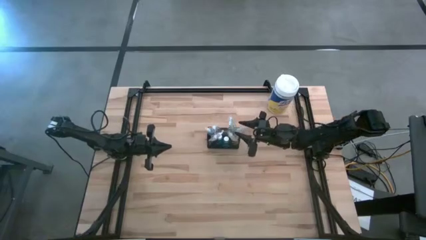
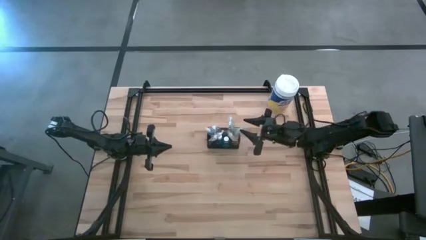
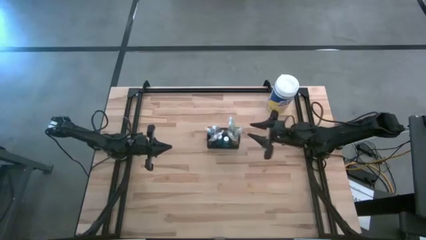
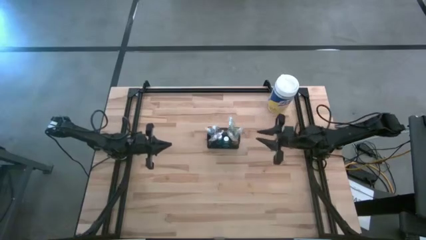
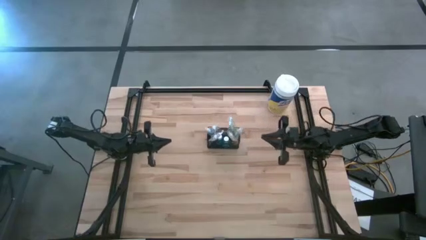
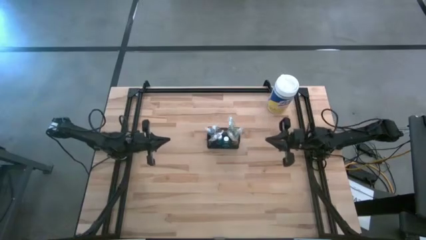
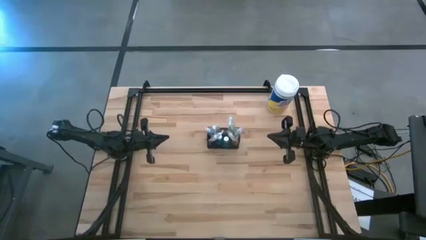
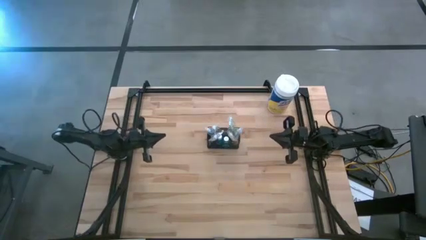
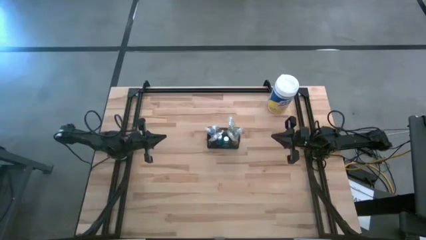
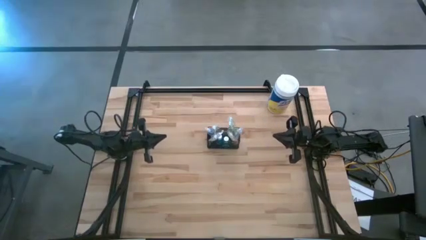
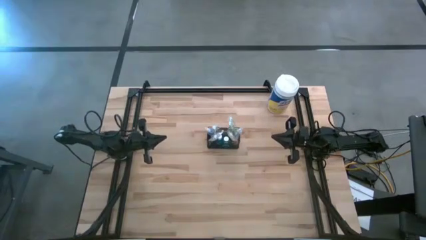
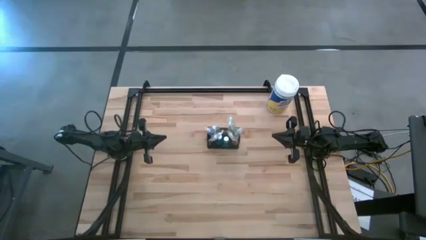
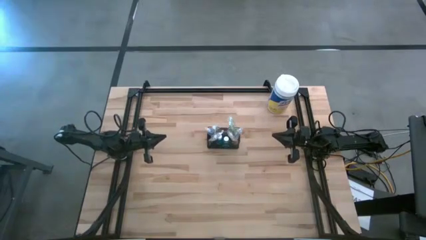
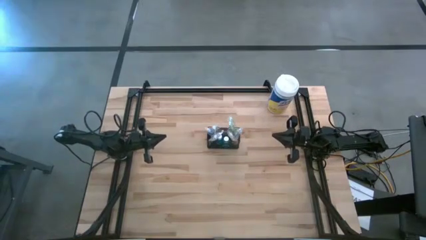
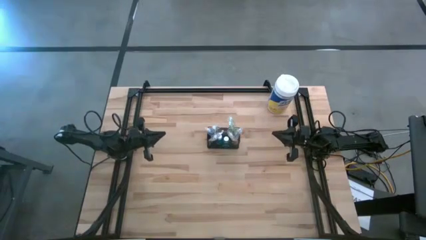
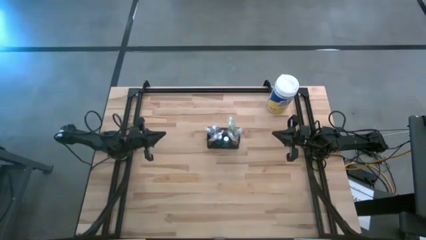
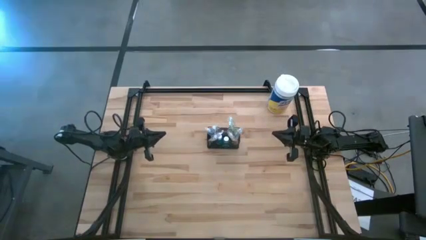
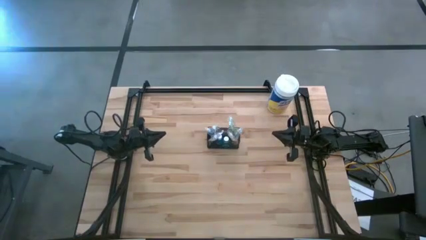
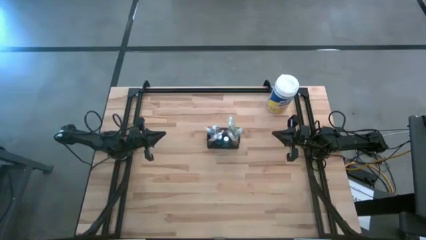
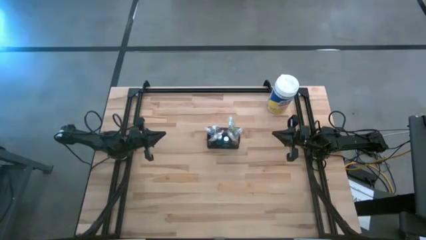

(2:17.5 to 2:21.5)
Task: Pick & Place toothbrushing station
Return to Home Position

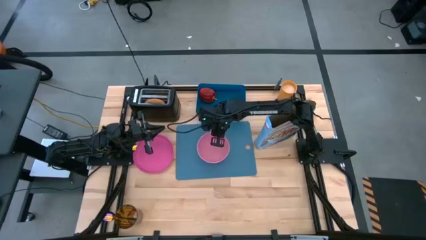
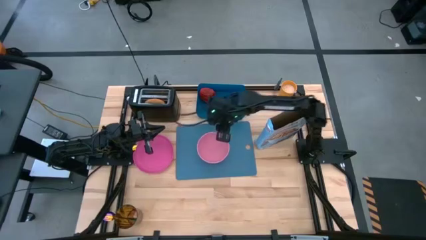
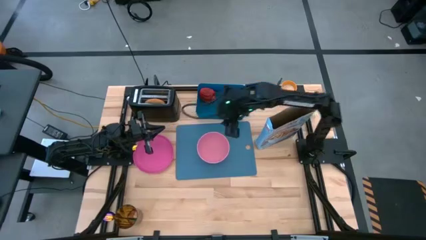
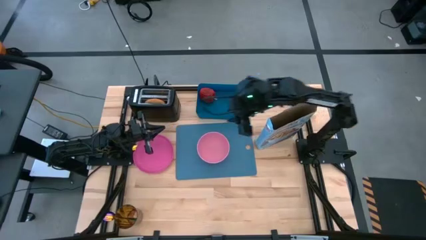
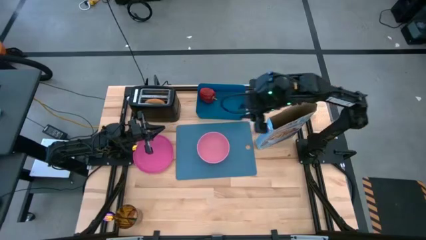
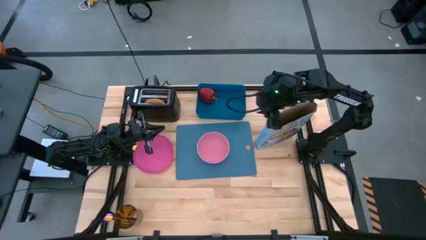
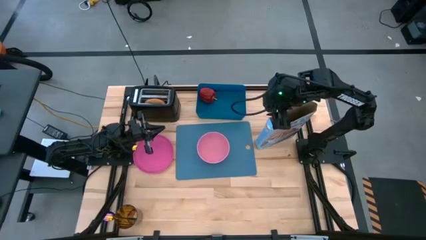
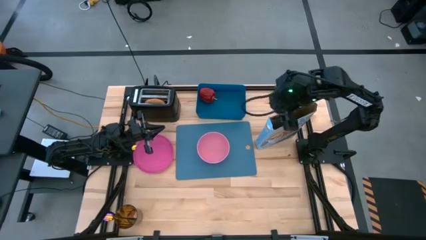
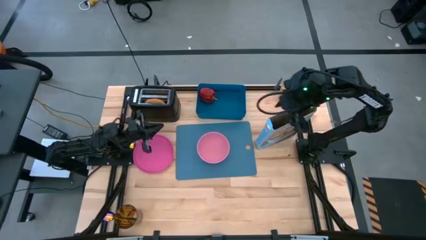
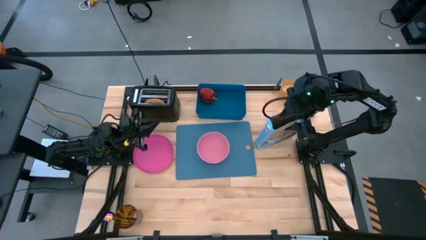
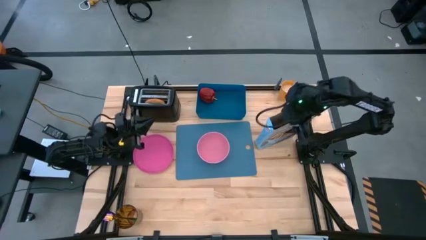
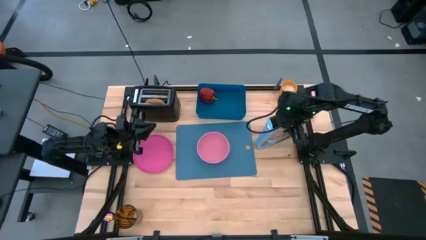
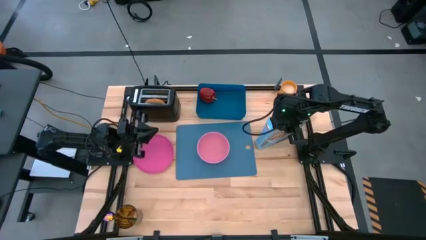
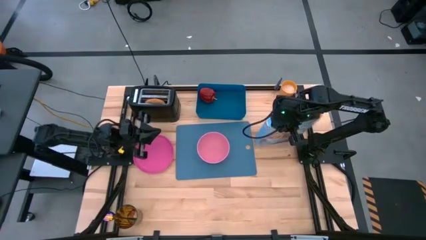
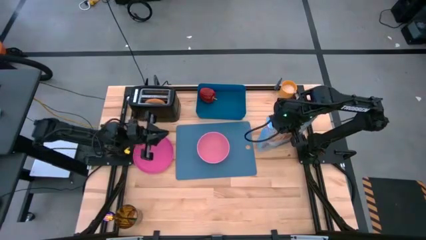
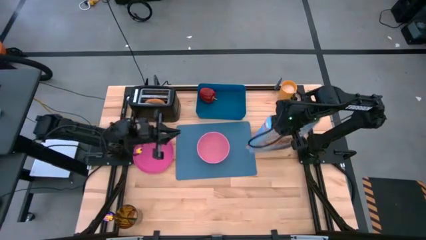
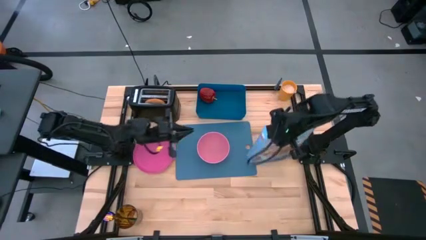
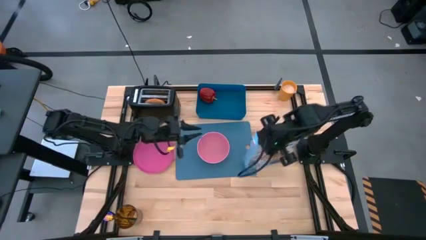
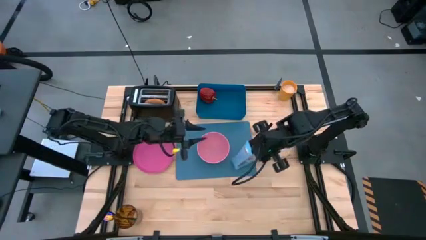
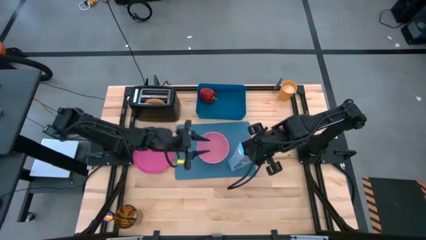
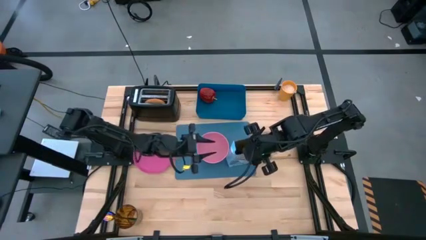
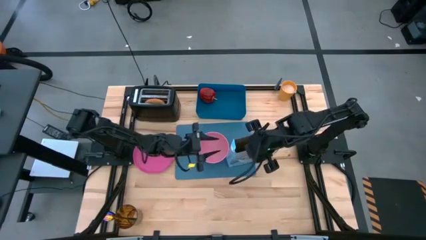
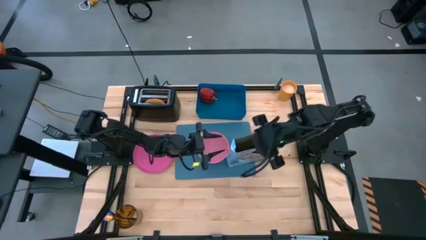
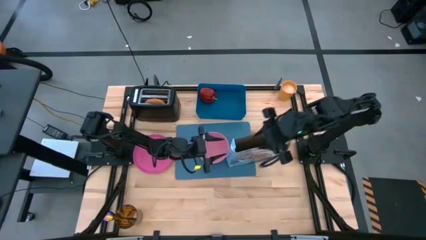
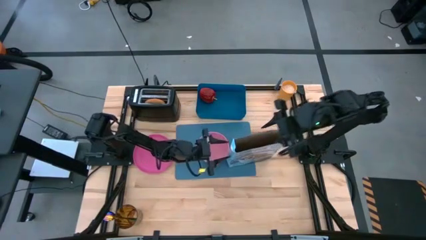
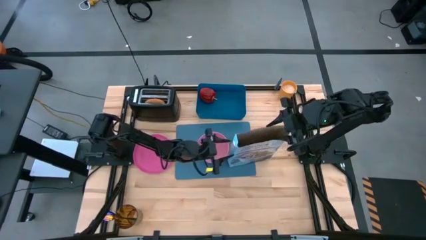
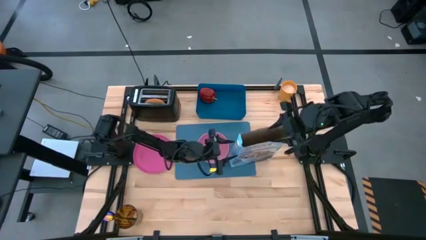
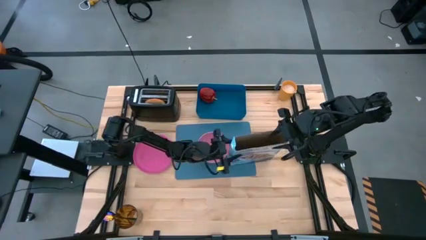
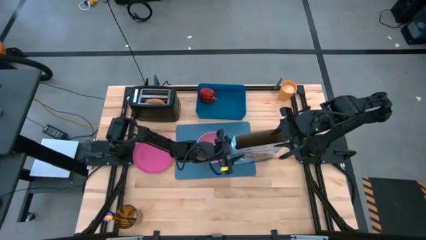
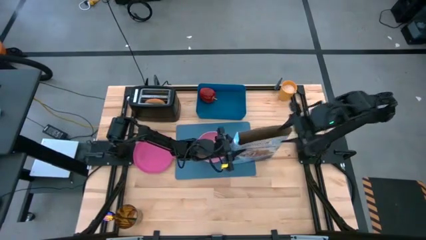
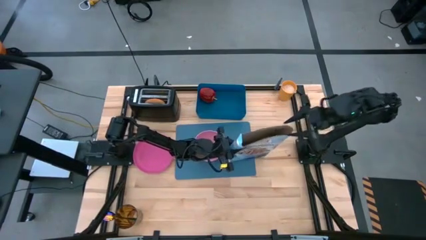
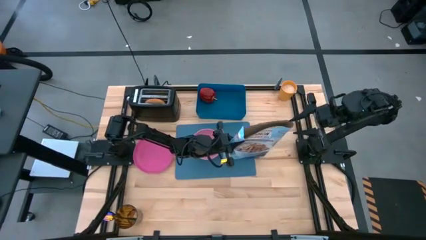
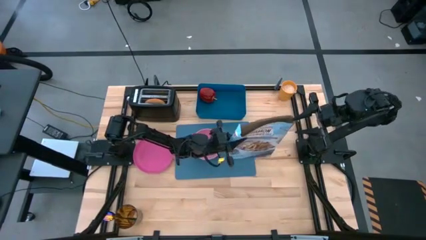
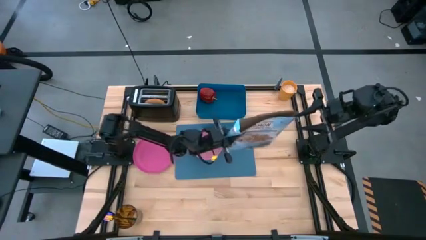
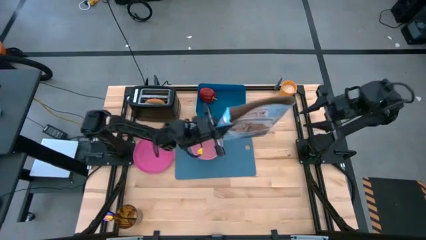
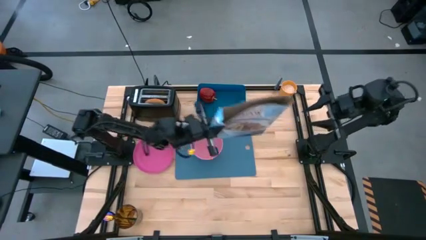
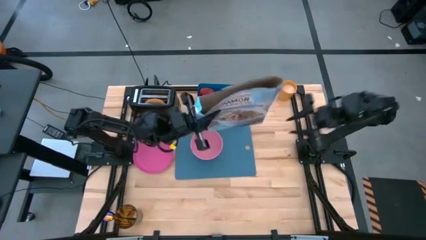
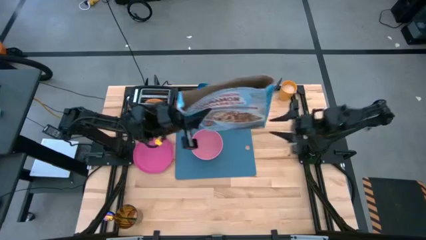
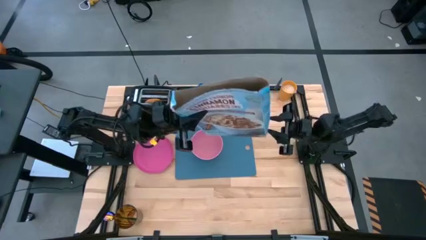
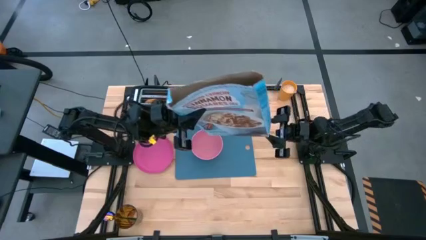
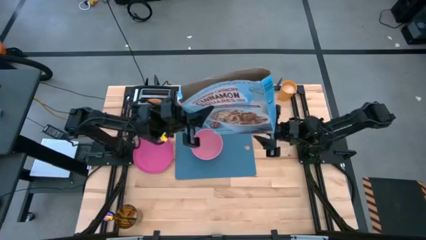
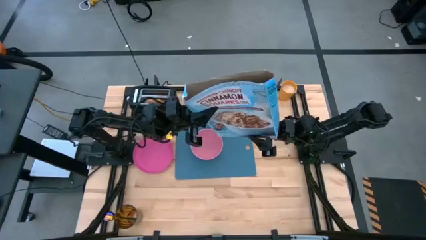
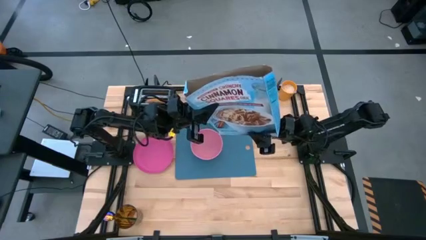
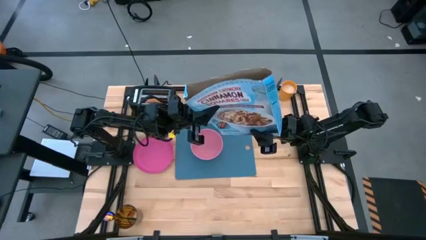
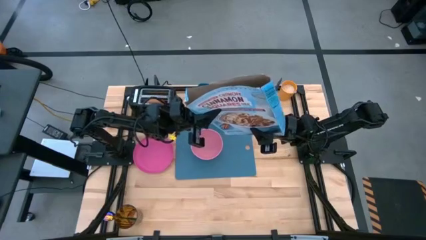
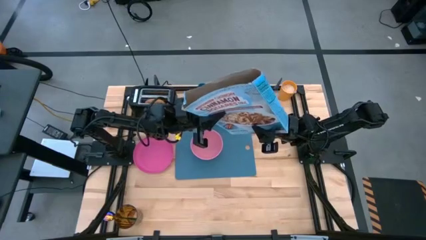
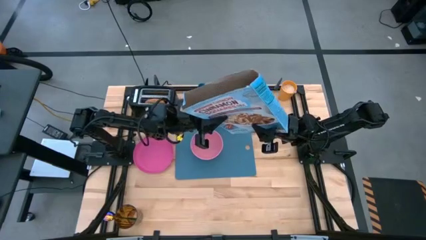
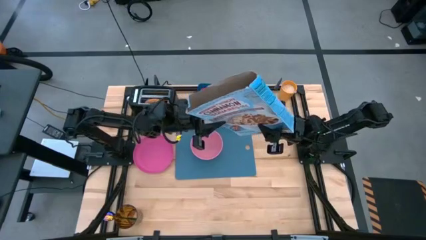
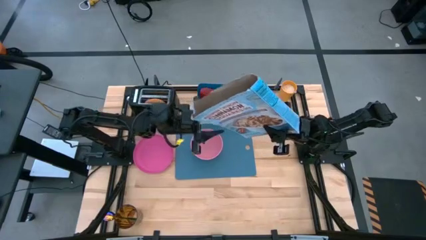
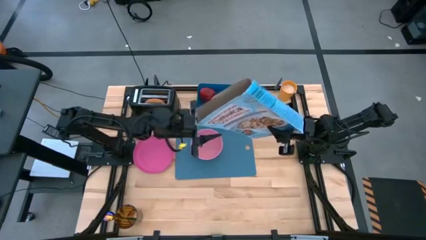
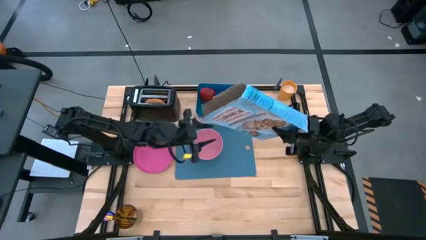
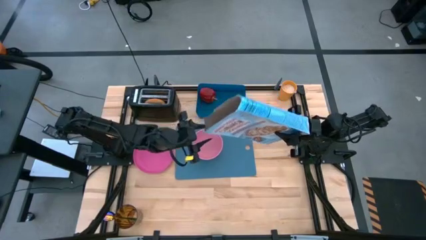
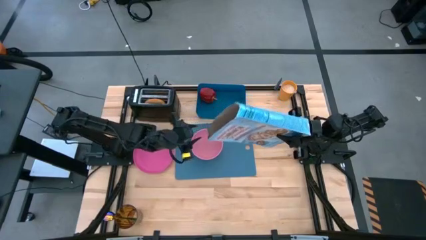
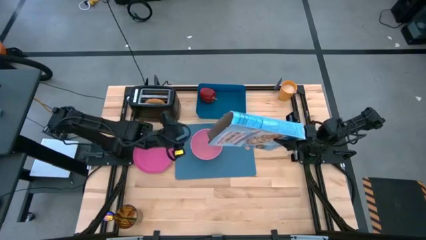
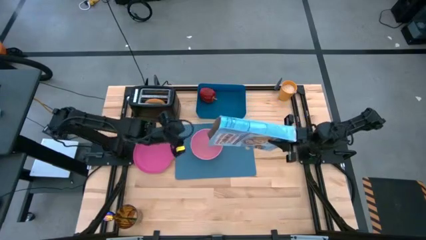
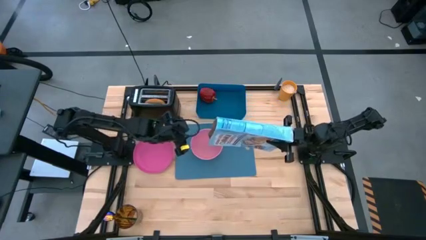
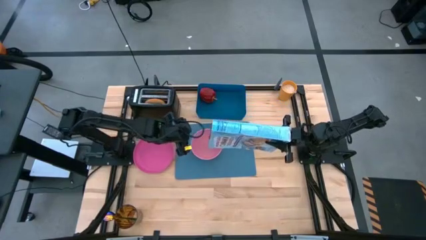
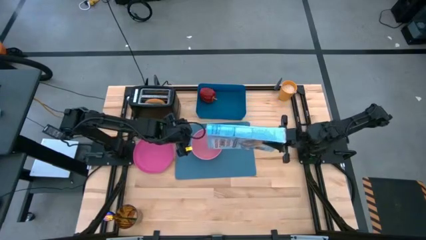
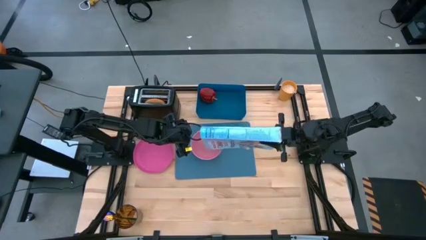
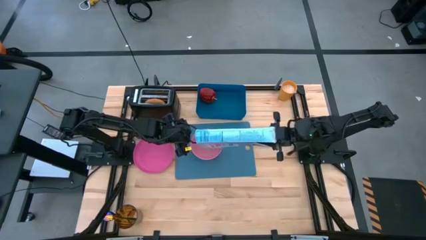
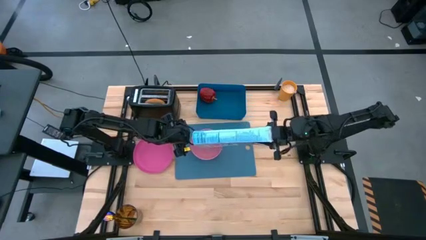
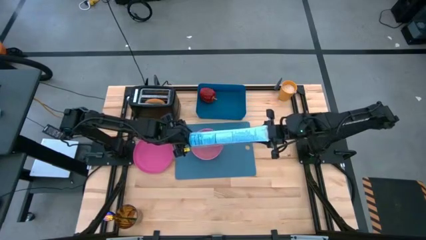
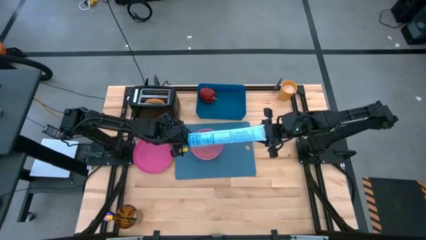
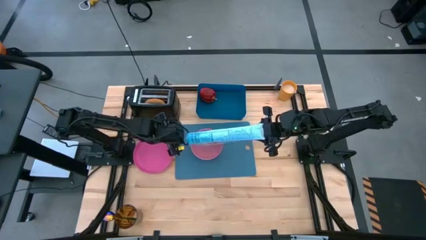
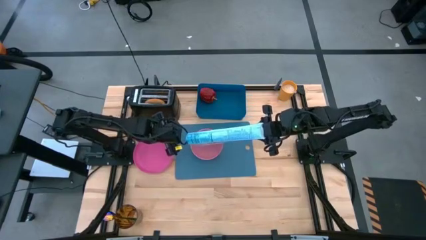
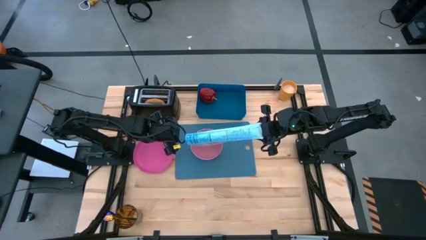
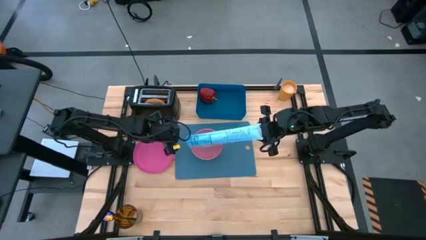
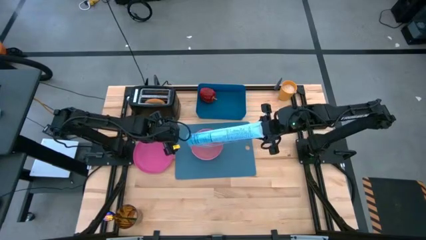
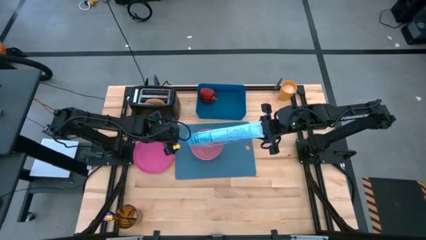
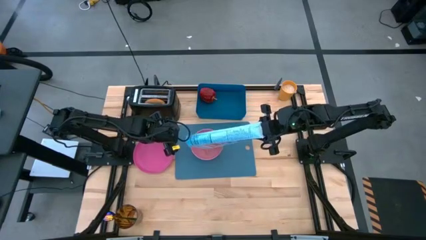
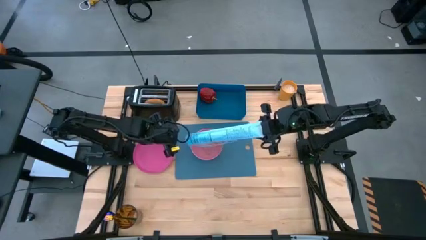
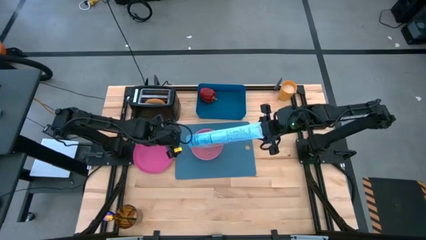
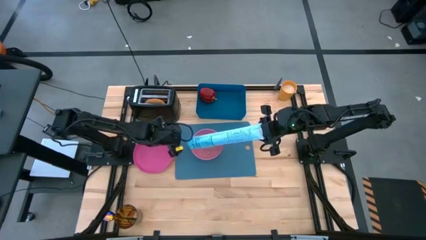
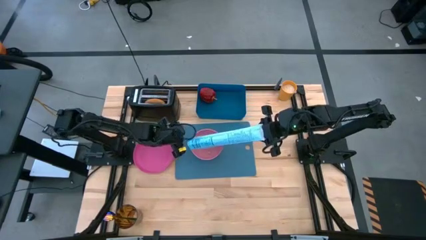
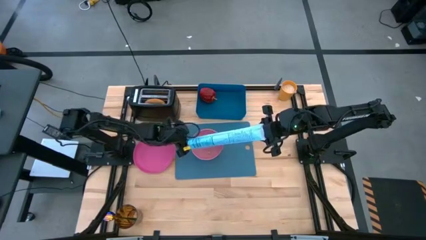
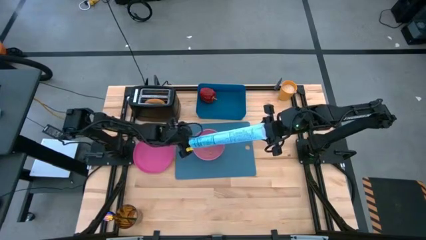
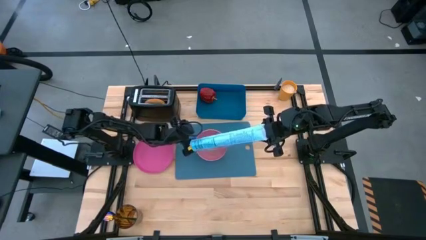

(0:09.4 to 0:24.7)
Task: Arrange a breakfast setting
Pour the cereal from the cereal box into the pink bowl
